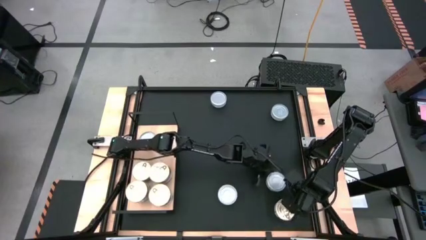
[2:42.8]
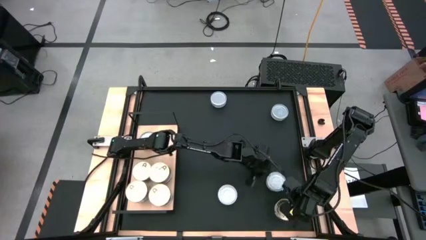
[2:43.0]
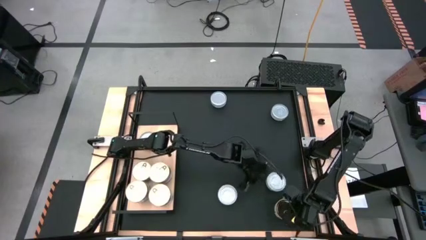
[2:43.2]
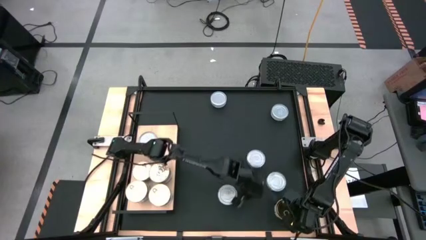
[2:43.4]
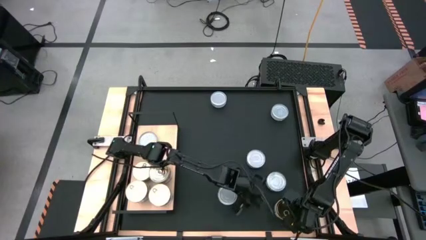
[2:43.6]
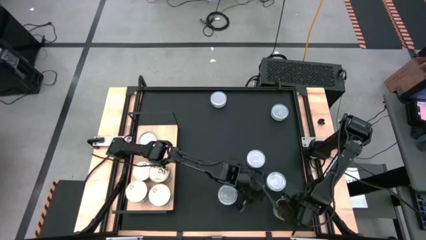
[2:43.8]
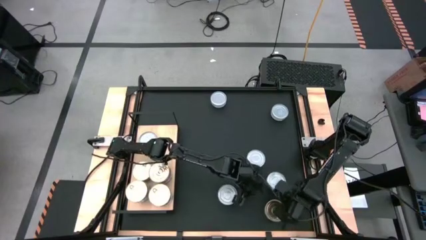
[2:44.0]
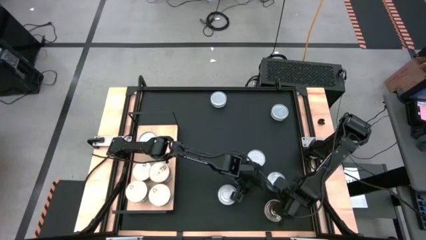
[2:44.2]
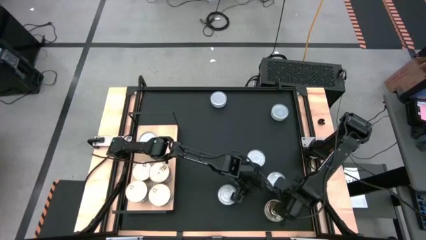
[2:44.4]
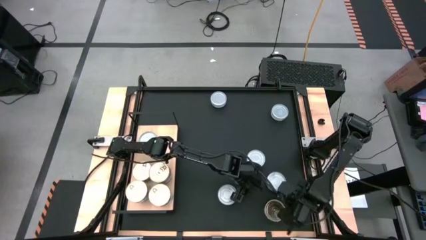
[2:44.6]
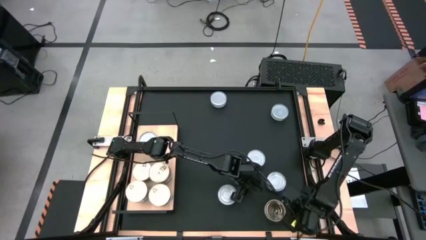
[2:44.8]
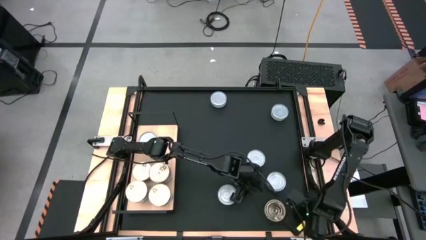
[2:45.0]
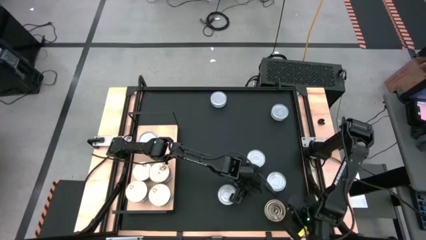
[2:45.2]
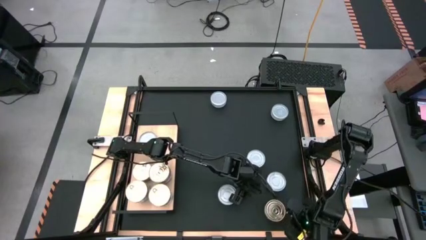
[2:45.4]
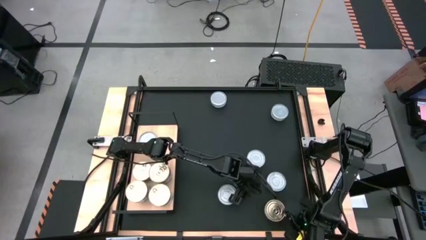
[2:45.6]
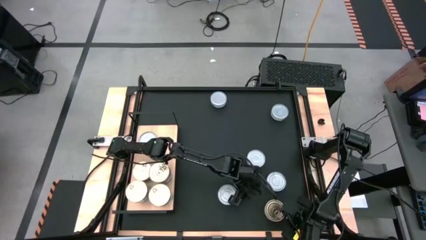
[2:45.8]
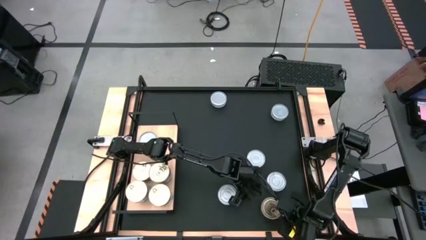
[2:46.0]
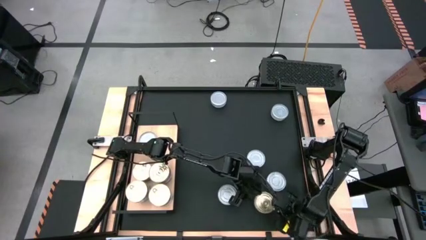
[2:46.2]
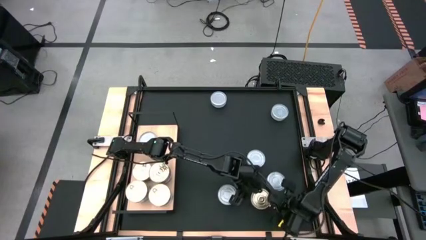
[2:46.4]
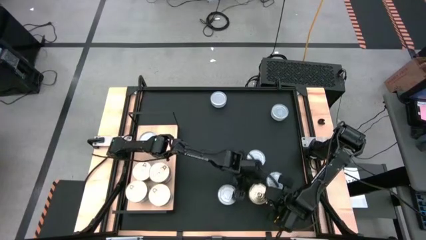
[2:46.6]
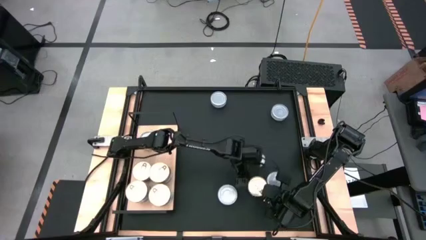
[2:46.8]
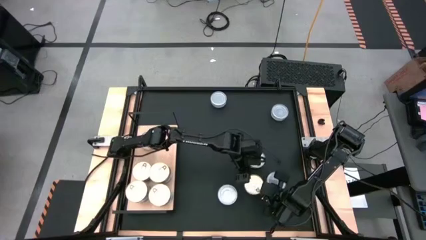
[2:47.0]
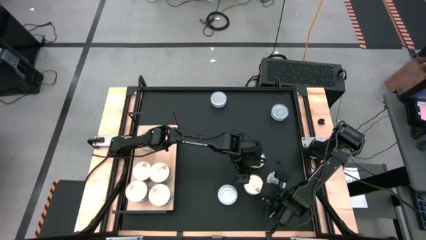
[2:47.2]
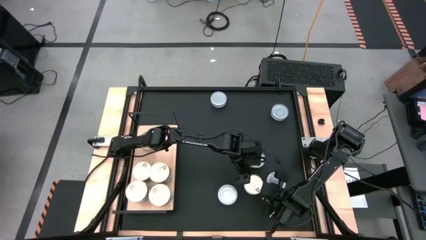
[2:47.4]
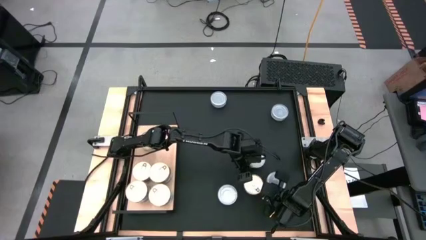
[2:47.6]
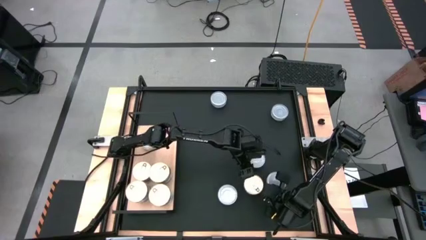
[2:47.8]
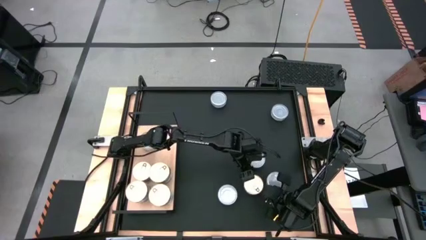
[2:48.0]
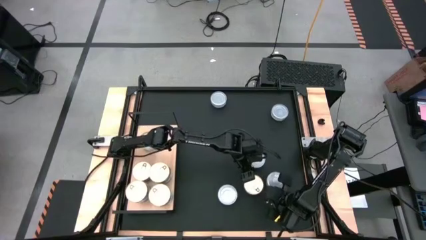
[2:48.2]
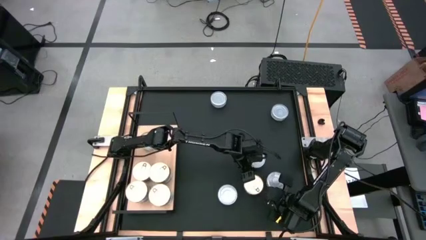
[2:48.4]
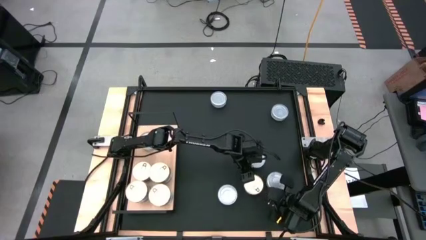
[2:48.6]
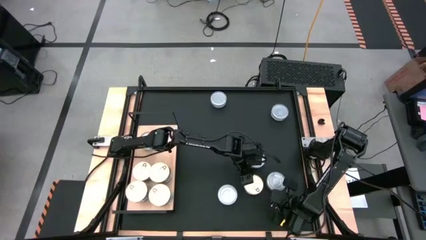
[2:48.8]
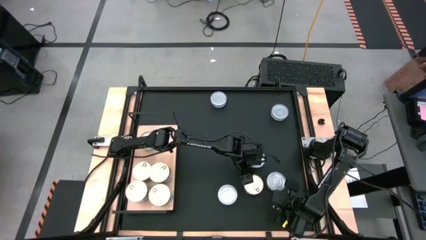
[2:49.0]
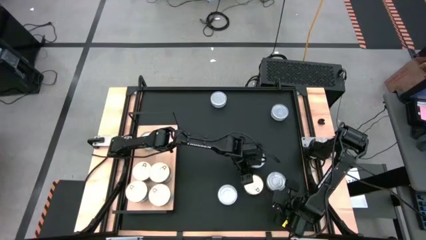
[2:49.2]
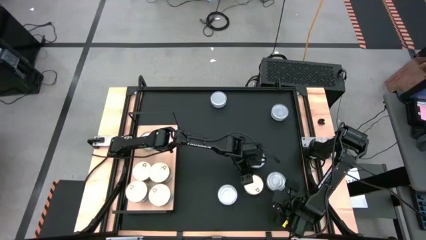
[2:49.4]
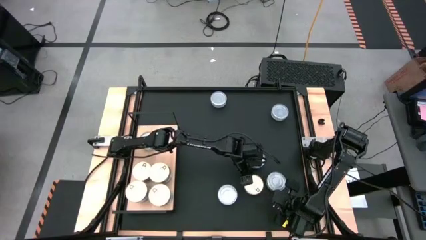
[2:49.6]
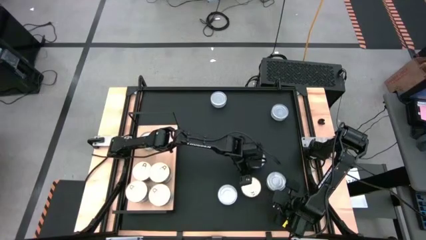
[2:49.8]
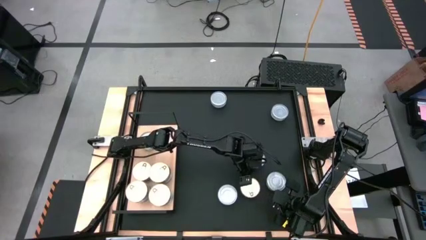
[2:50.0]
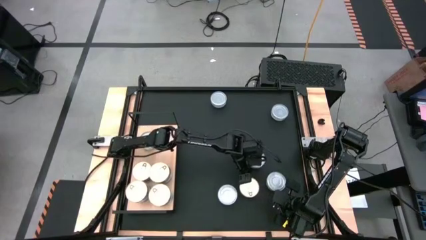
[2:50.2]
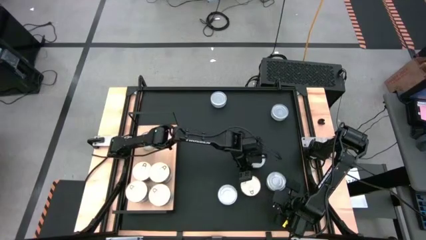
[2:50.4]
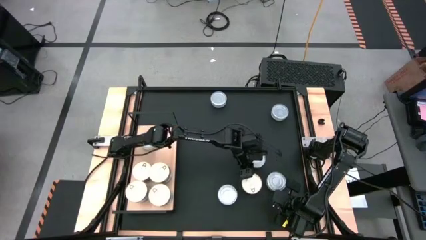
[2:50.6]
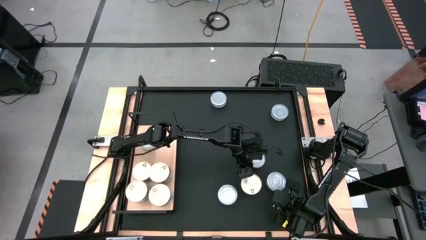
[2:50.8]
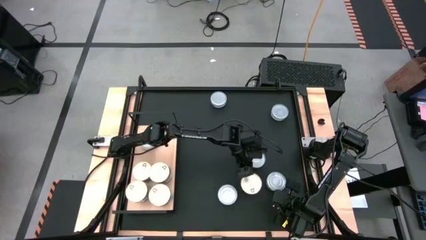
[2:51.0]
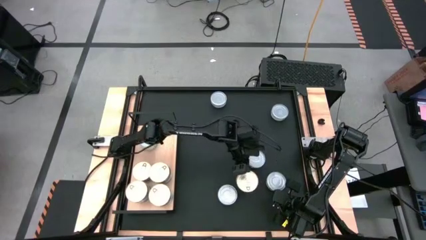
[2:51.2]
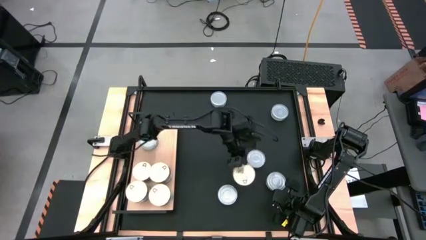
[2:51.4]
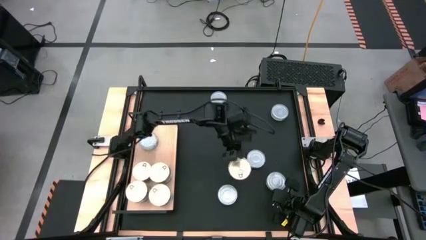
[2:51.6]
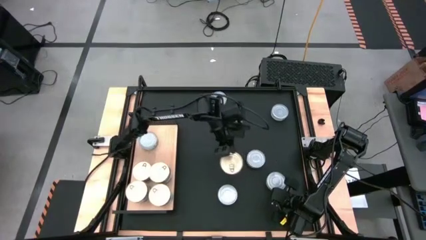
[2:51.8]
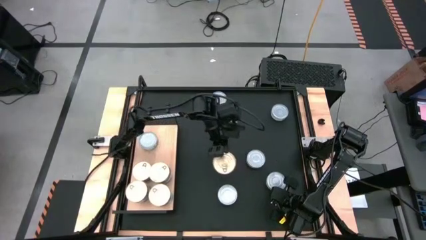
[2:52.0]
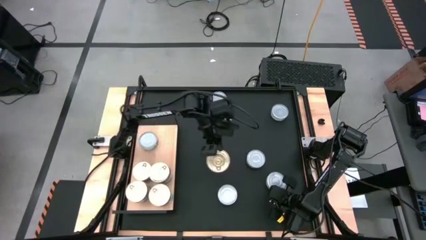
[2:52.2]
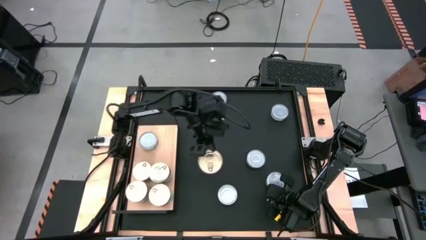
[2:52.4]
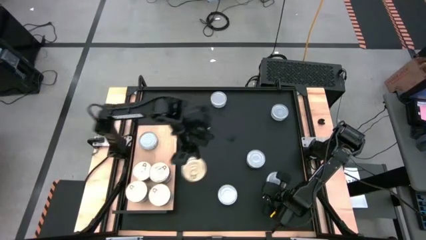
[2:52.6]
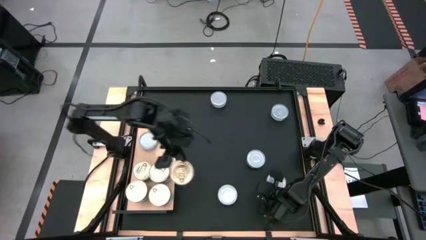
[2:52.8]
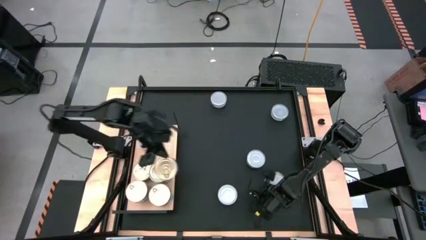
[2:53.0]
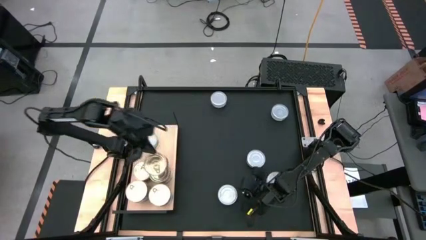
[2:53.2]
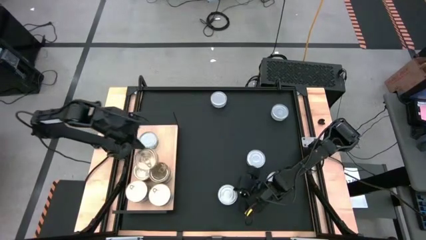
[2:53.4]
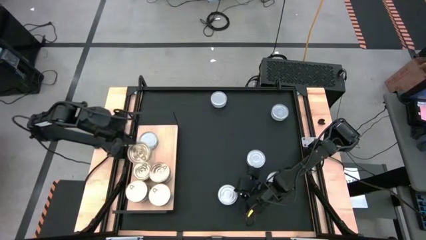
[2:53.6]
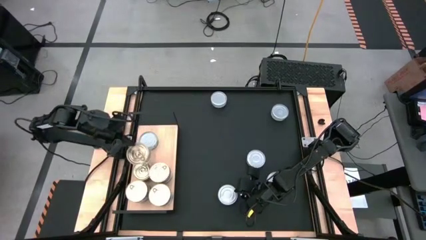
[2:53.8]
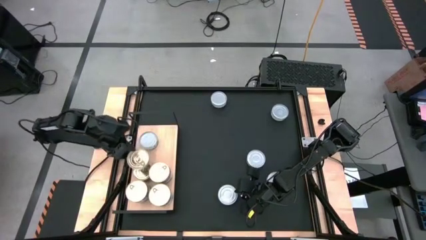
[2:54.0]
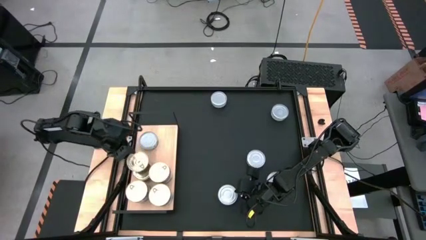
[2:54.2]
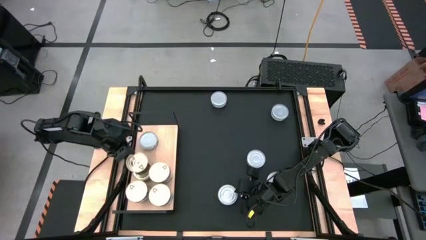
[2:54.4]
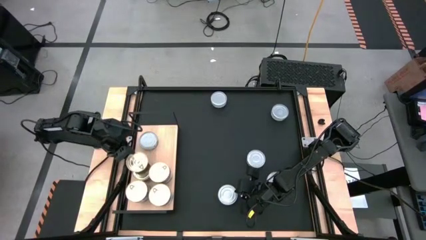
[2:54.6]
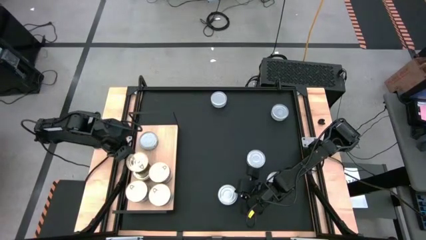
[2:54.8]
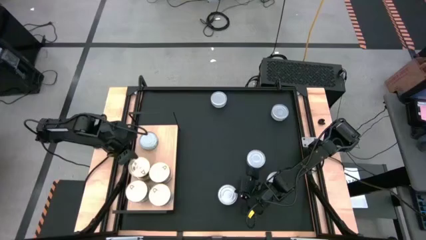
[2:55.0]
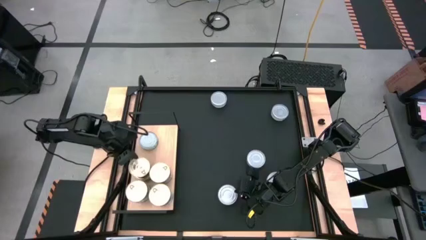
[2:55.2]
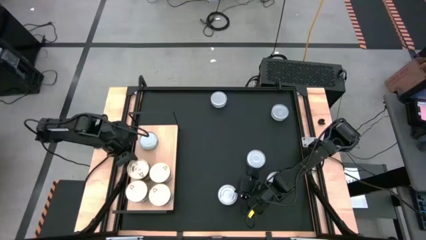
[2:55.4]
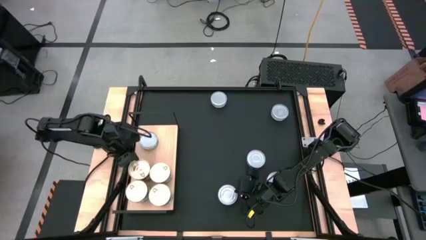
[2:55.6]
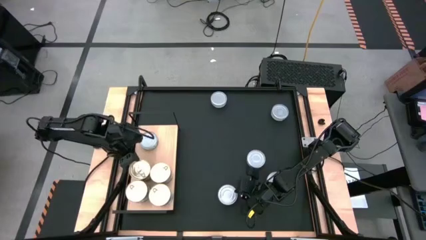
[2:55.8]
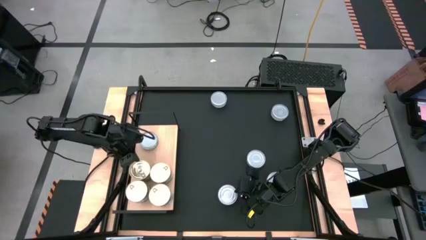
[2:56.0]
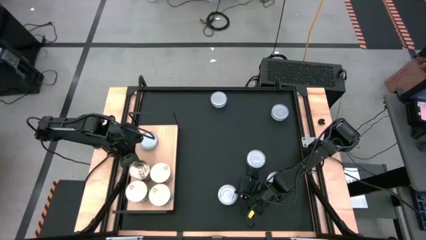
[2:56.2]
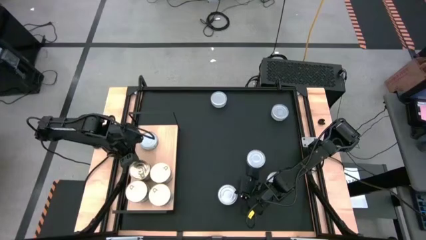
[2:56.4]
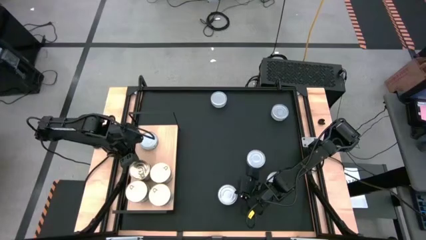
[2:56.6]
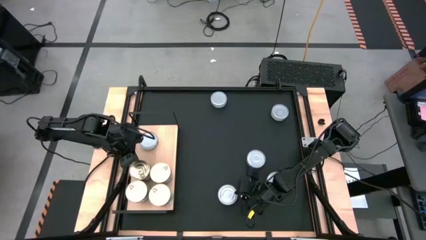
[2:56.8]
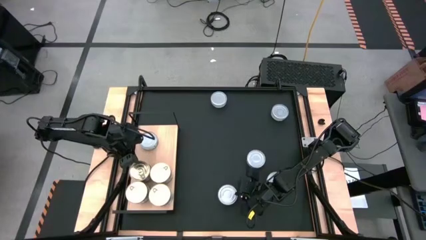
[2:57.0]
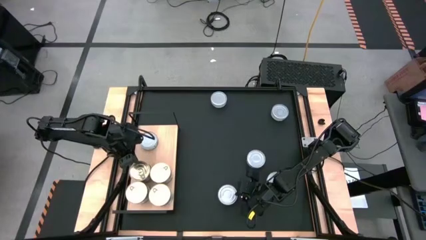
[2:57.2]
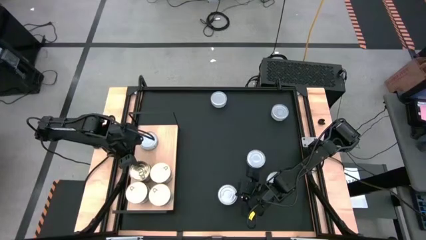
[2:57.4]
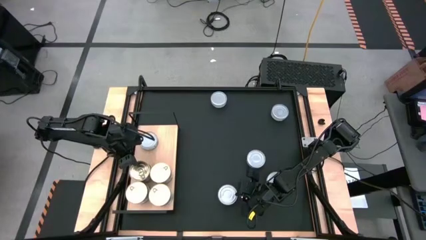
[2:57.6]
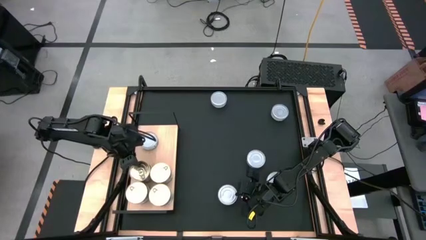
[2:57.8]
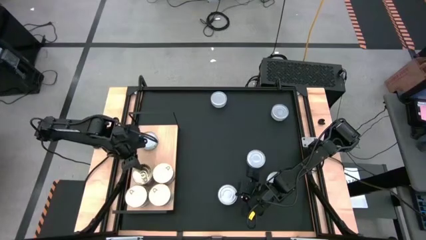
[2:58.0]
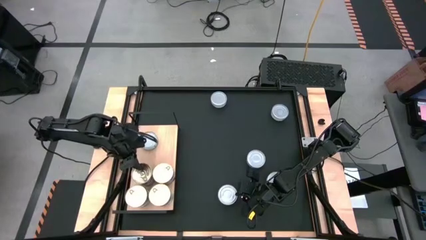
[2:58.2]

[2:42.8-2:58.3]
Task: Stack canned seafood by type on shelf
Stack the blue tuna can on top of the blue tuna can on the shelf

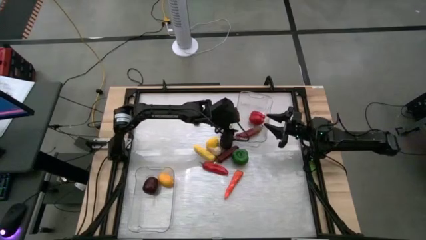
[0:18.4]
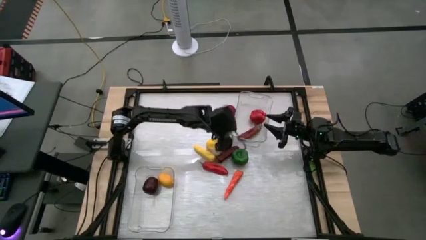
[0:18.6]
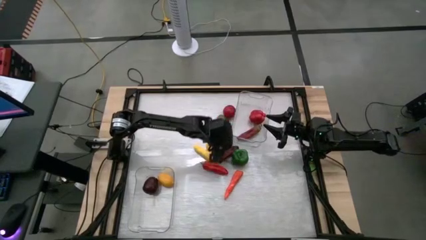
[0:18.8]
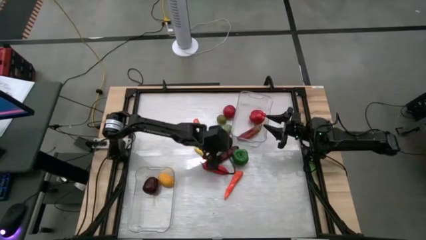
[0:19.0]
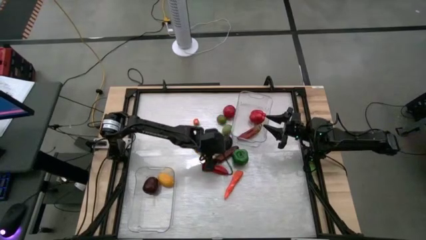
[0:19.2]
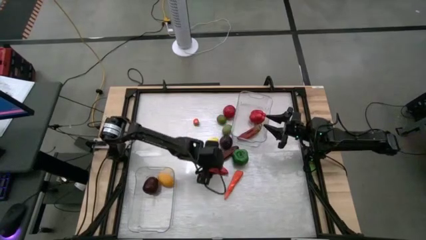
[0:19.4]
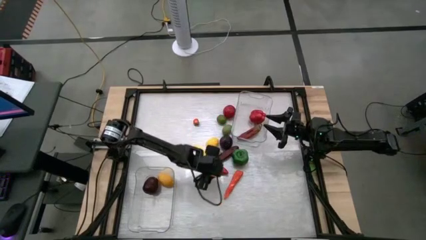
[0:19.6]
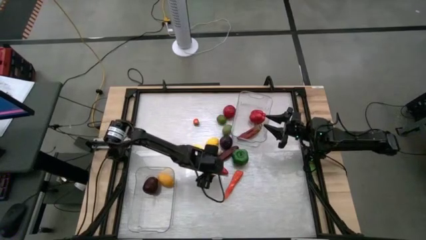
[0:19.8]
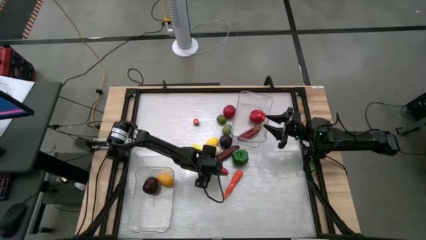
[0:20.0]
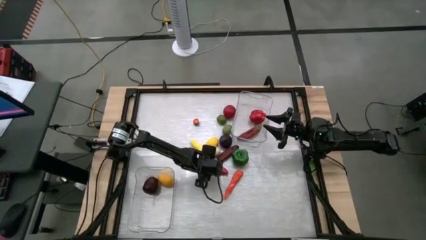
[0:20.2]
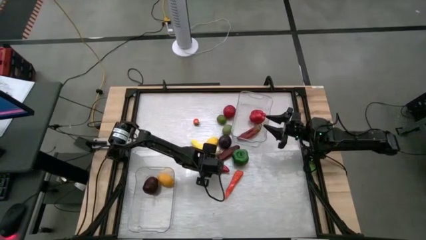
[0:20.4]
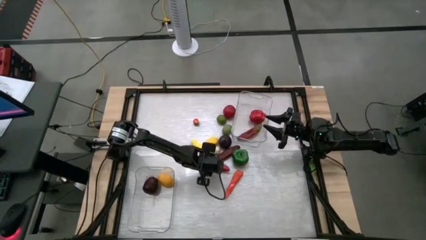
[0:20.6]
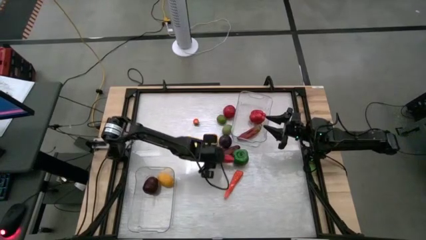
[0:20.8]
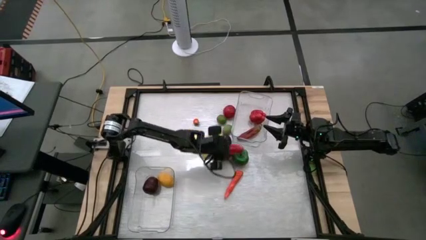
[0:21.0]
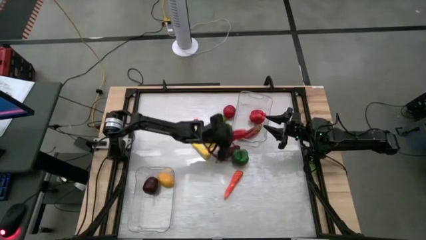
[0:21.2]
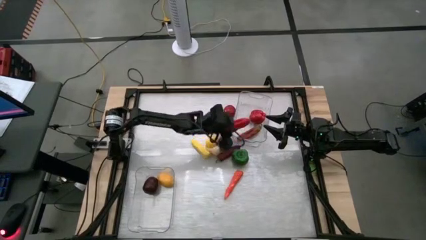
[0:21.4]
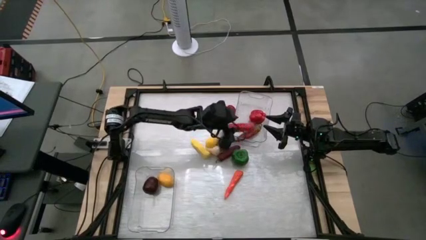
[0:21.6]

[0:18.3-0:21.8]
Task: Sort produce into baskets
Put the red chili pepper into the top transparent bin
